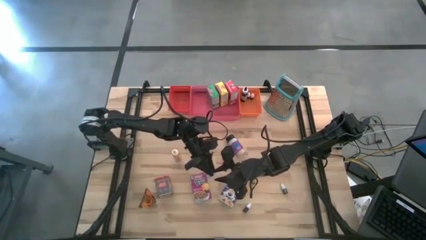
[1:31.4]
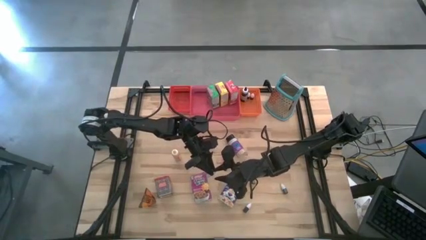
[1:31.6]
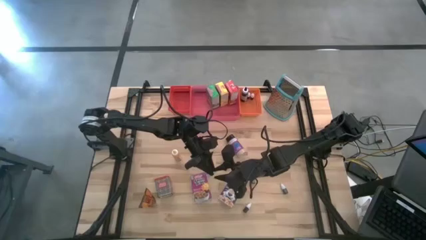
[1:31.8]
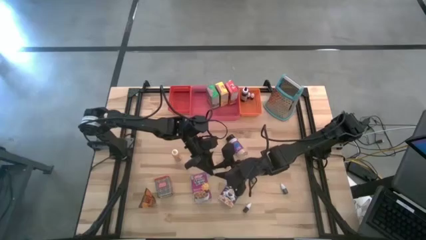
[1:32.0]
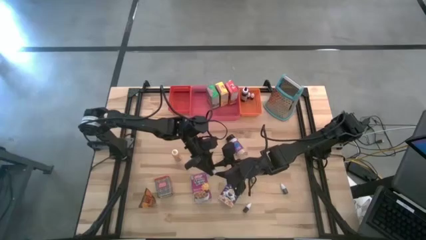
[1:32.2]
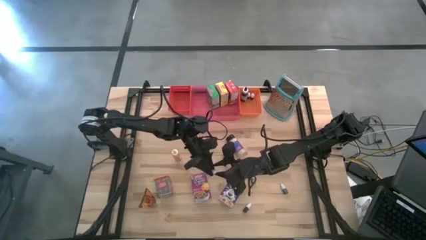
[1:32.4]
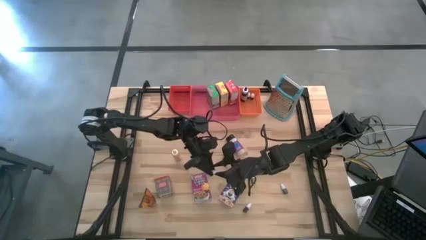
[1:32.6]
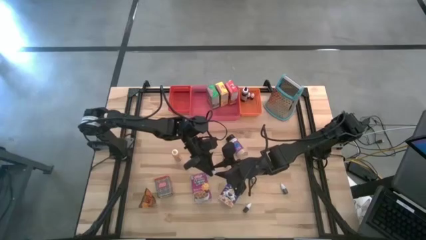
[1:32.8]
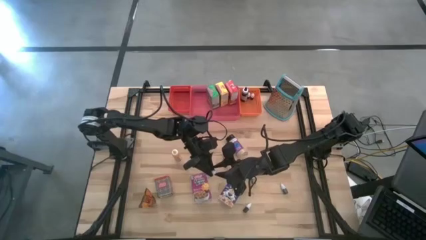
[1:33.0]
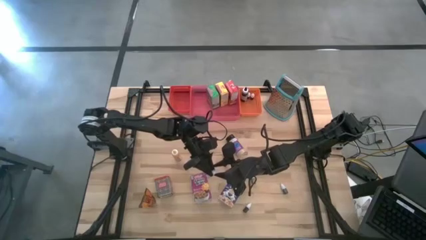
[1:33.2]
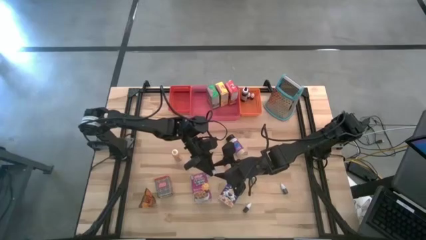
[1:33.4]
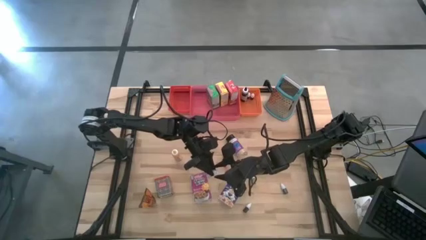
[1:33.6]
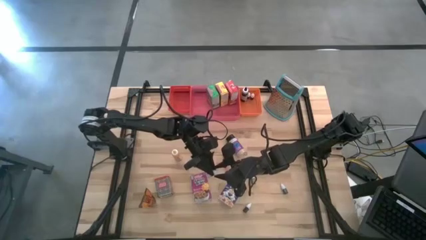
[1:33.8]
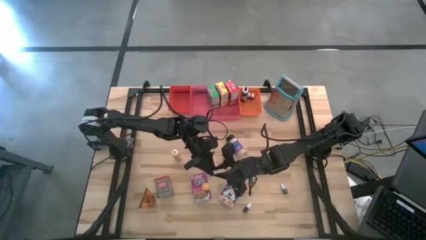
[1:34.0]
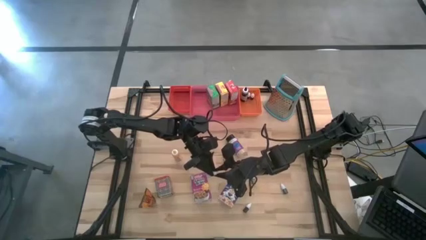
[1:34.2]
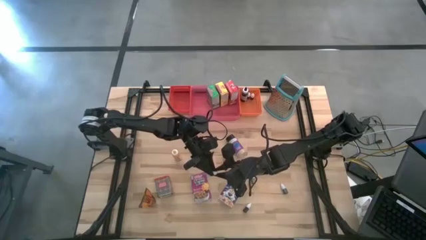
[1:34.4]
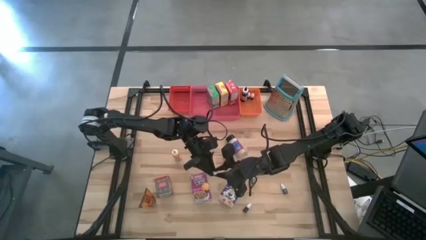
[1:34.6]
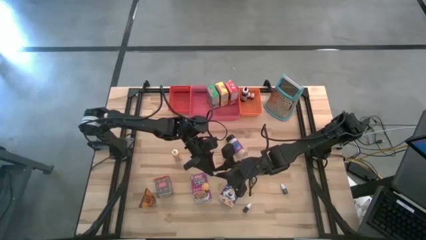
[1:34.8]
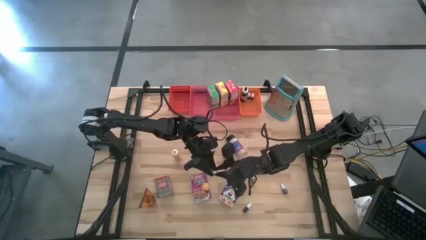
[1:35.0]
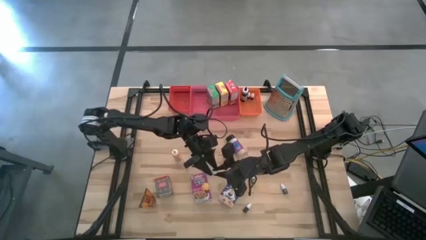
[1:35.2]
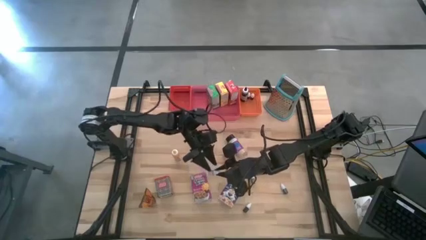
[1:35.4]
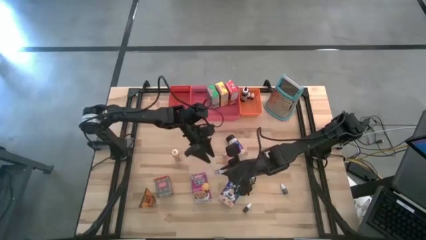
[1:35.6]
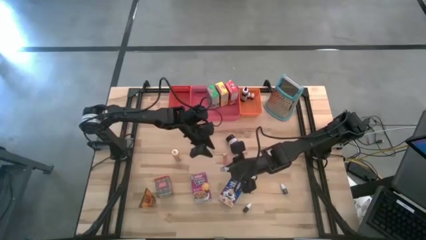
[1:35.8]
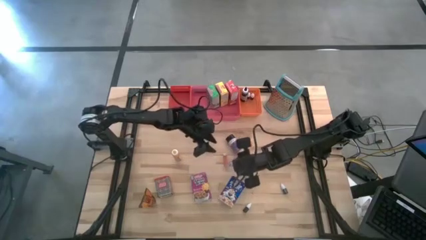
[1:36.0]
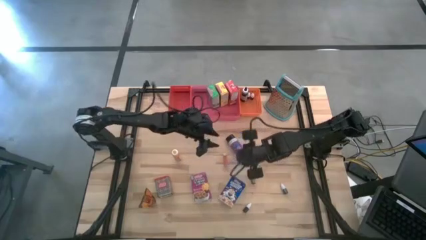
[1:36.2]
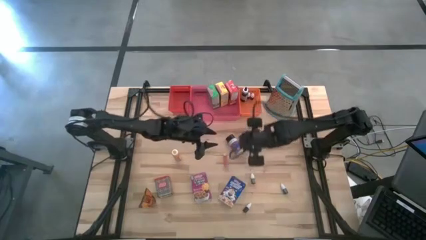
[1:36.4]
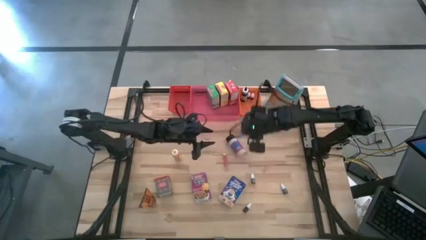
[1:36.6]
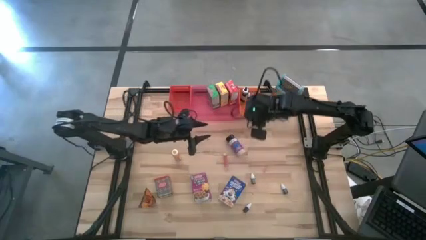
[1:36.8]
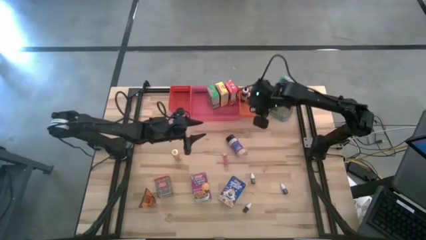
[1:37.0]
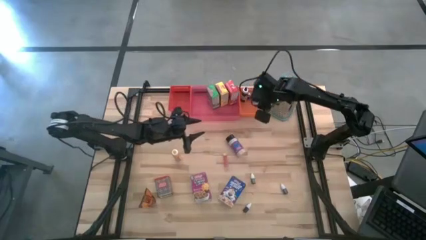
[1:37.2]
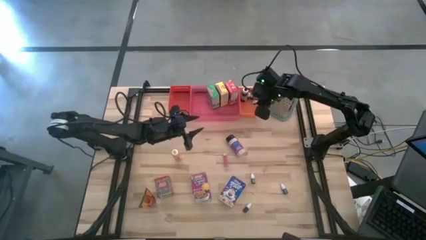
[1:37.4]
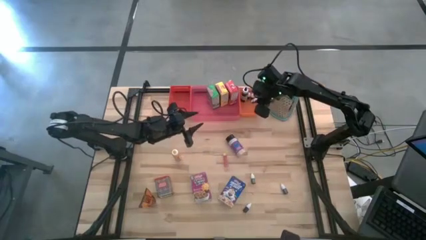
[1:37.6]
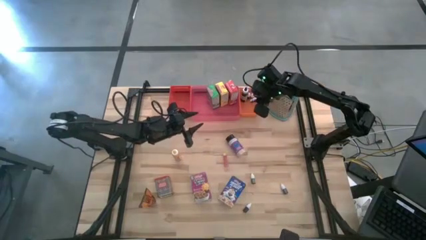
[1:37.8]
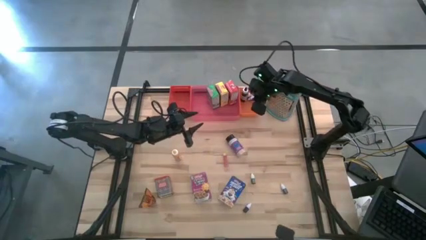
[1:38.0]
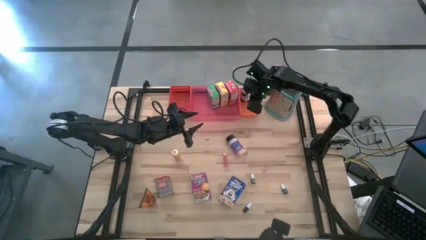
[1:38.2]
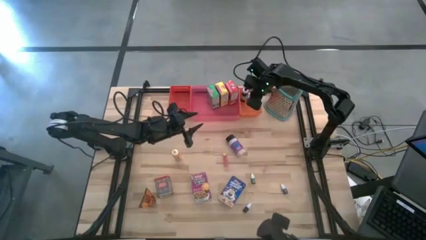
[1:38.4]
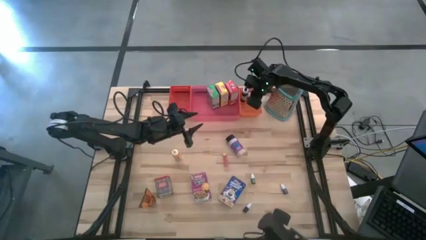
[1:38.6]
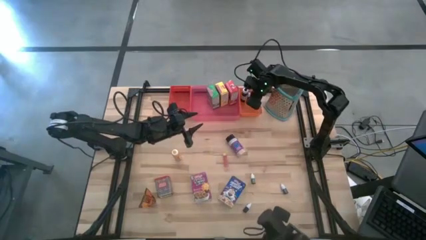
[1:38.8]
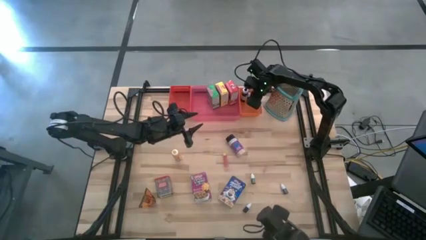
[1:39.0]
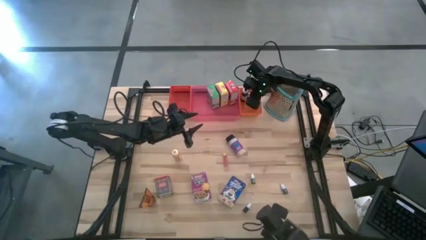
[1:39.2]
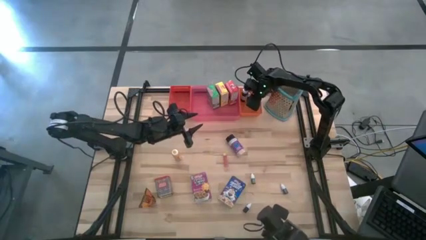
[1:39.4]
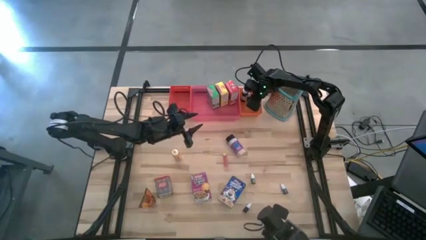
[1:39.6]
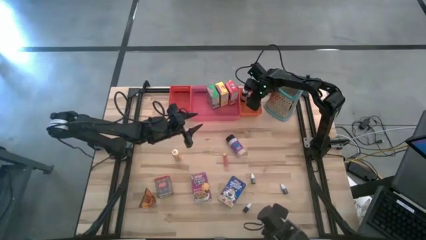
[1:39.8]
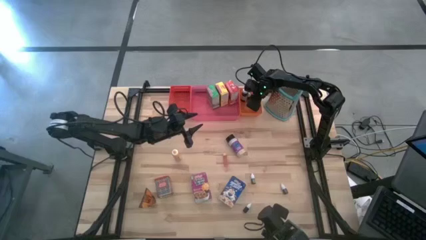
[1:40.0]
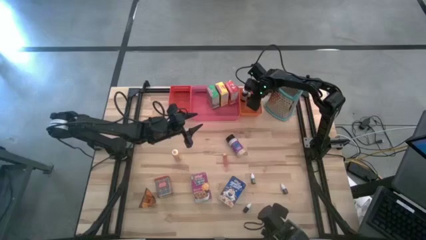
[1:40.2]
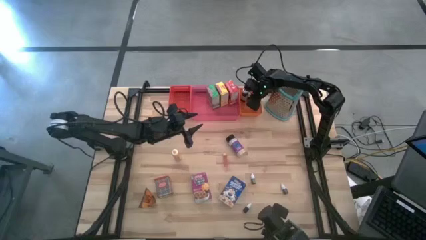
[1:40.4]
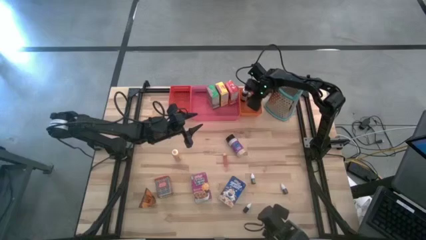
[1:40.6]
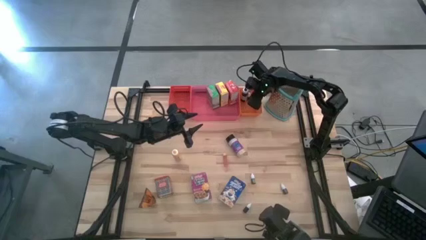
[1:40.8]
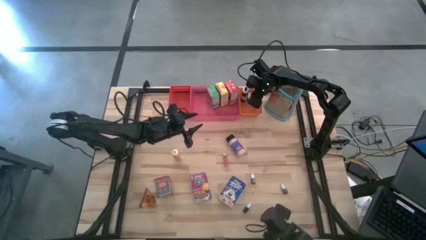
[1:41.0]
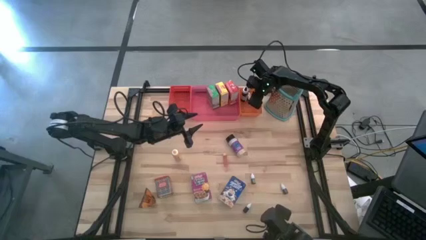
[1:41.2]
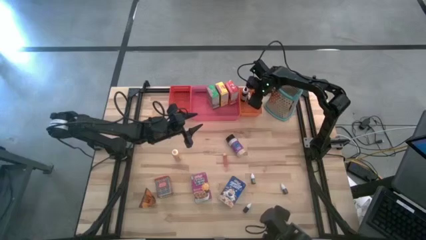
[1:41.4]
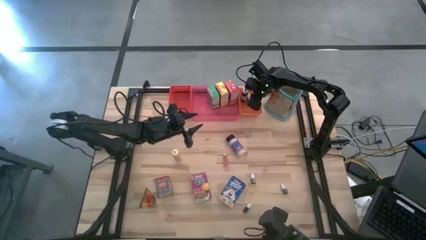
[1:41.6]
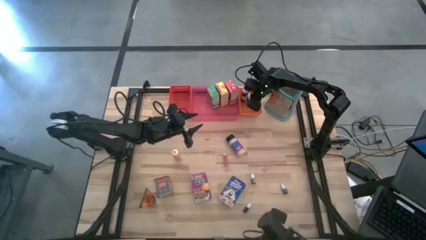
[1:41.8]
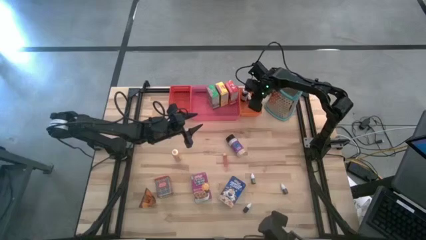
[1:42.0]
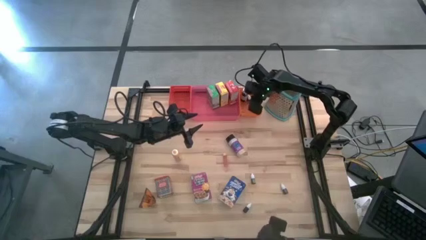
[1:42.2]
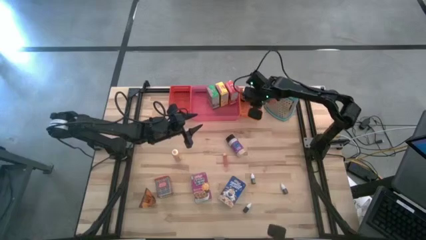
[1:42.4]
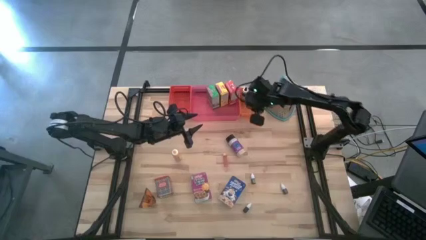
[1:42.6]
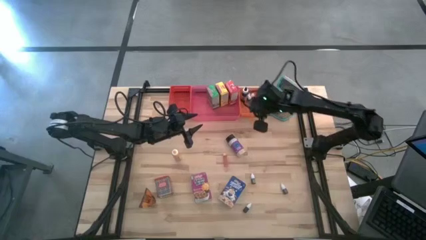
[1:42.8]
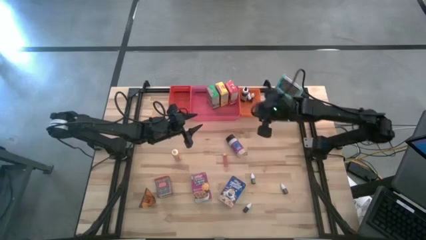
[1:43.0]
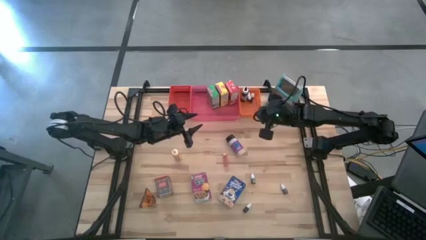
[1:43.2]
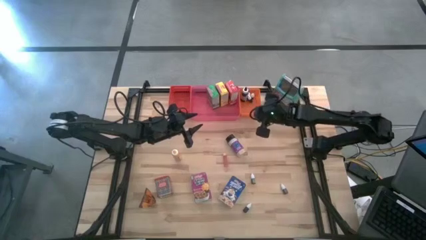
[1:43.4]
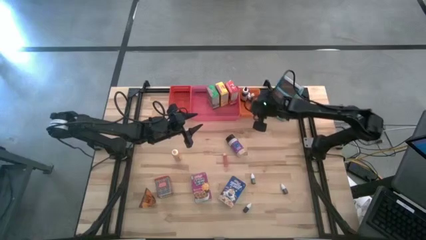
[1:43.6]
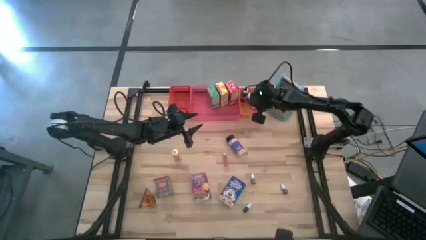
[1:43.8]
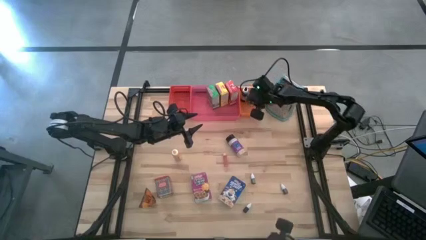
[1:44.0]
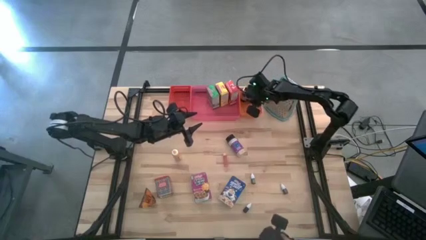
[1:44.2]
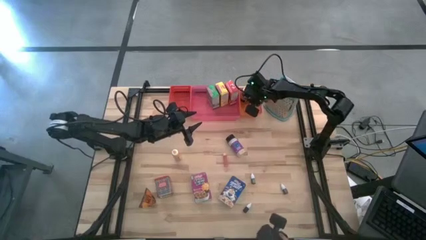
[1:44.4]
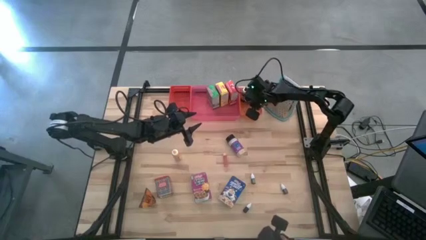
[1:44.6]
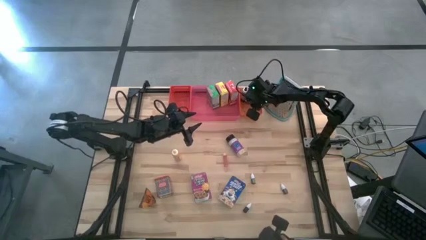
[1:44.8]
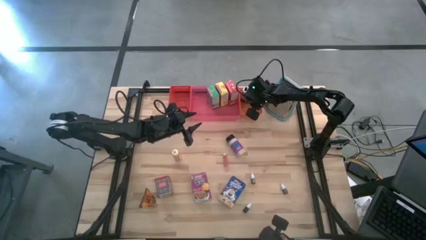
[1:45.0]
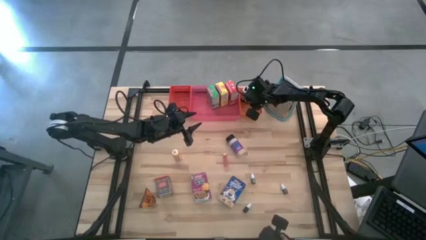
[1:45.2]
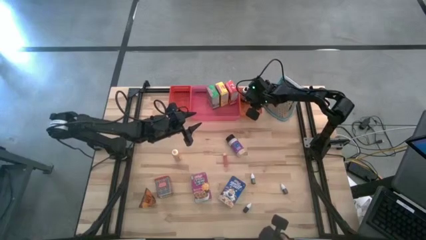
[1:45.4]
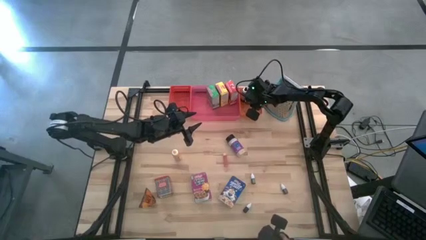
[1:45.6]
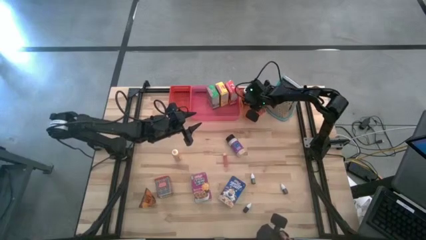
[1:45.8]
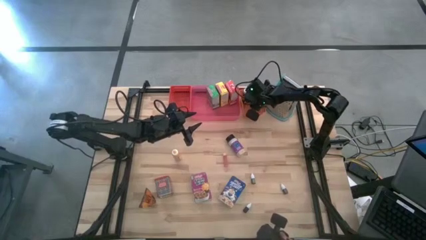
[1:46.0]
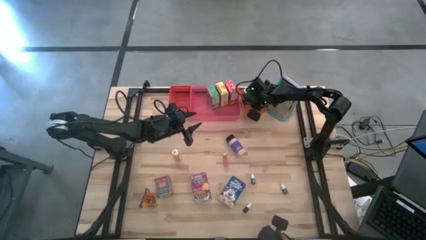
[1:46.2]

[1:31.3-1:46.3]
Task: Pick & Place Kitchen Items
Put the red food coloring bottle into the orange bin
